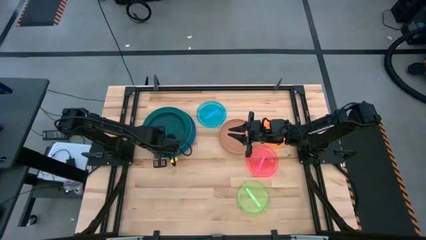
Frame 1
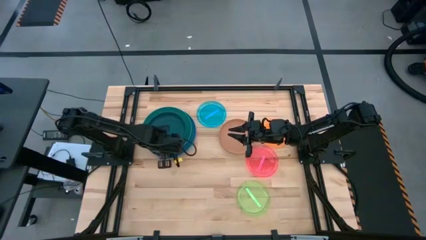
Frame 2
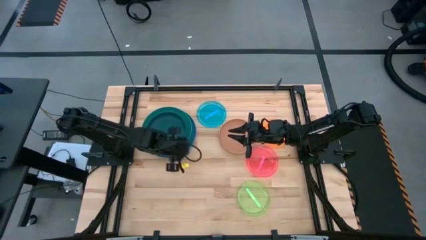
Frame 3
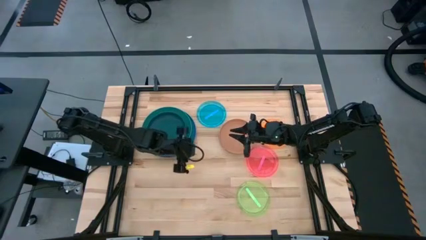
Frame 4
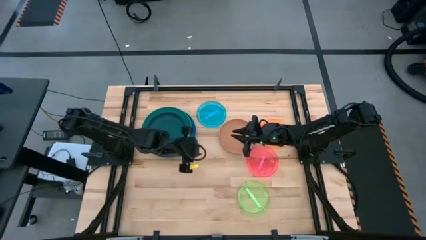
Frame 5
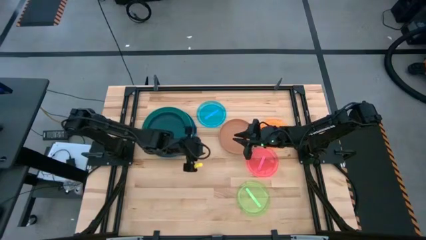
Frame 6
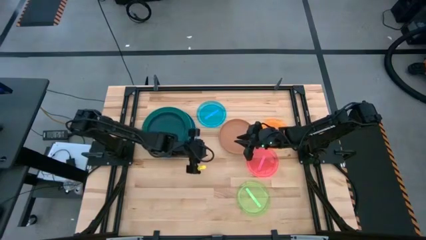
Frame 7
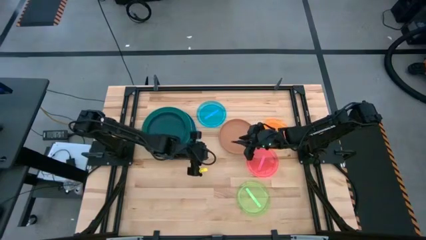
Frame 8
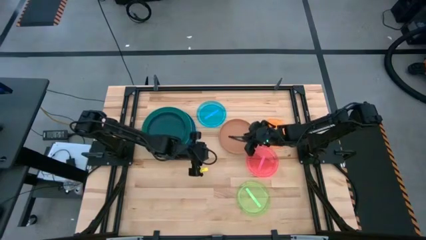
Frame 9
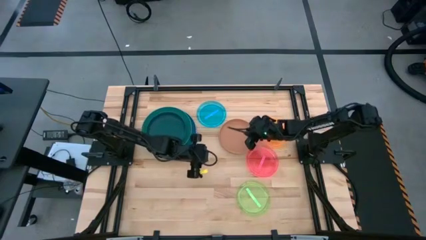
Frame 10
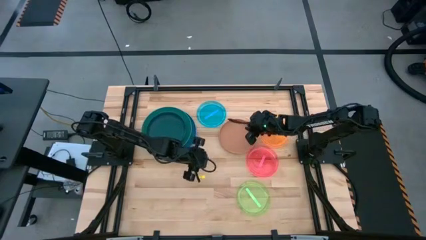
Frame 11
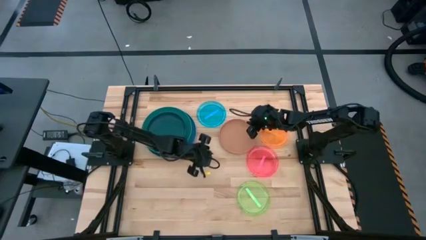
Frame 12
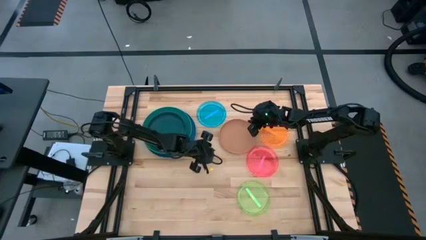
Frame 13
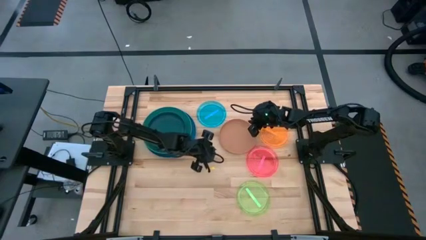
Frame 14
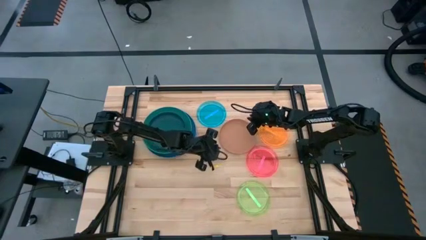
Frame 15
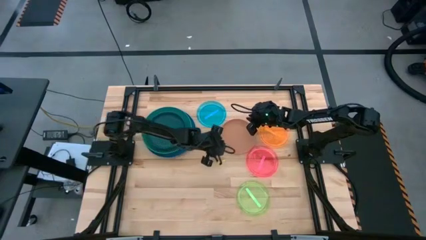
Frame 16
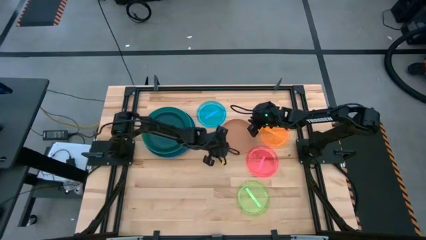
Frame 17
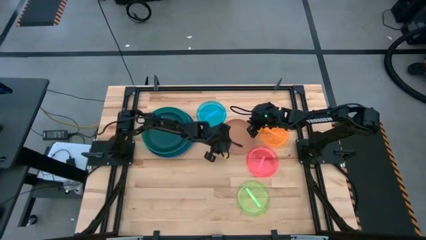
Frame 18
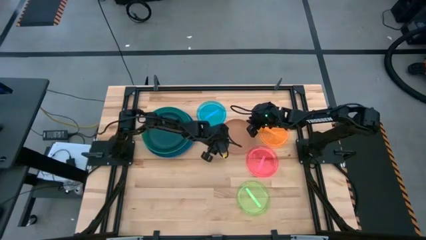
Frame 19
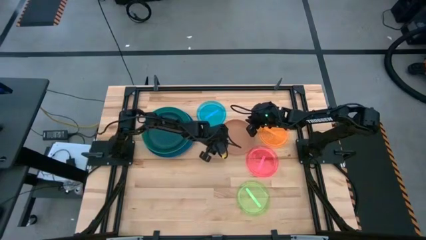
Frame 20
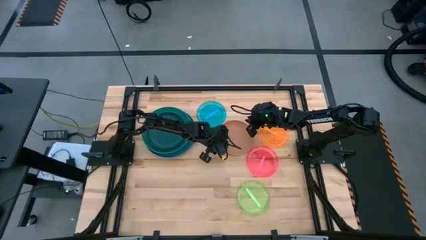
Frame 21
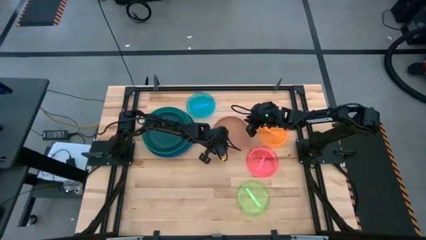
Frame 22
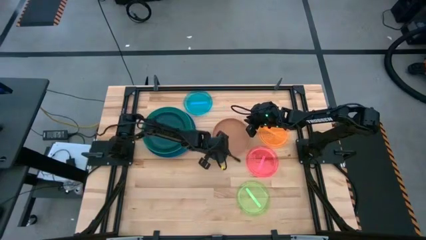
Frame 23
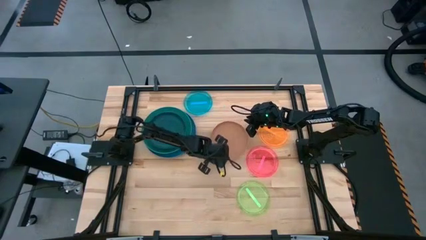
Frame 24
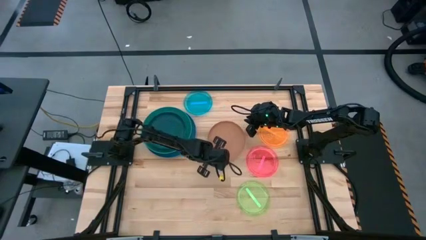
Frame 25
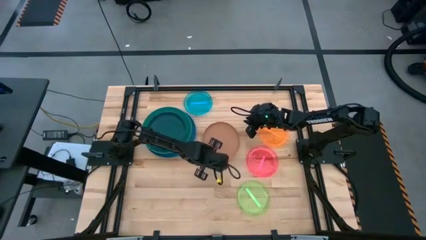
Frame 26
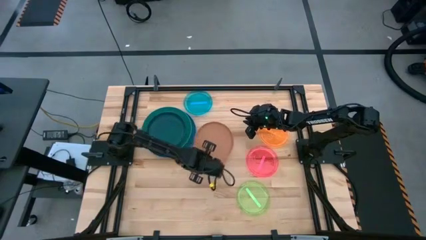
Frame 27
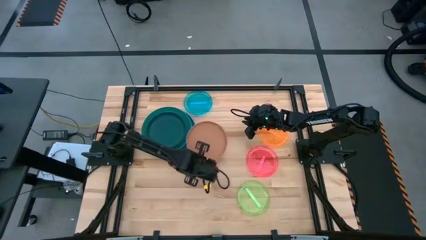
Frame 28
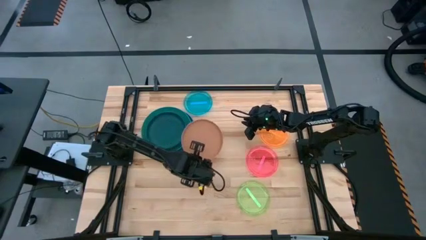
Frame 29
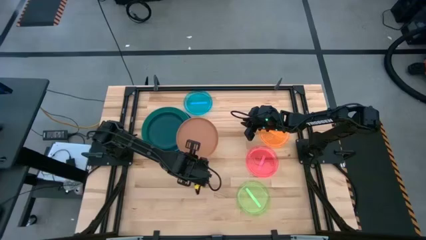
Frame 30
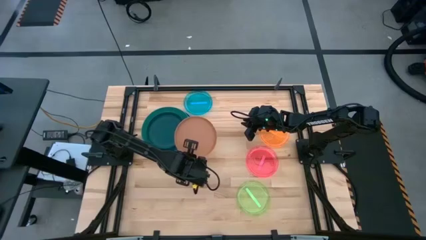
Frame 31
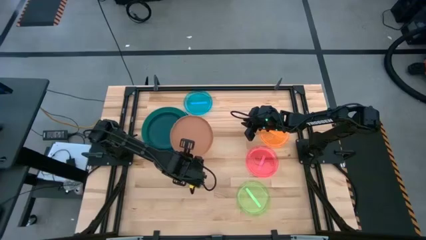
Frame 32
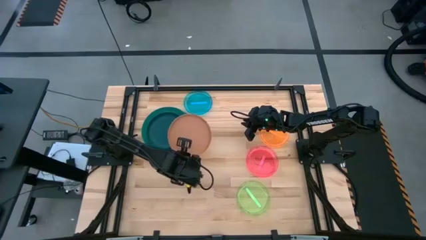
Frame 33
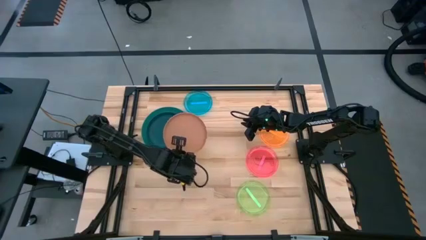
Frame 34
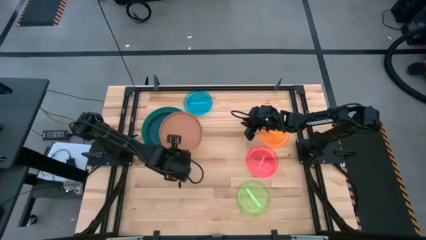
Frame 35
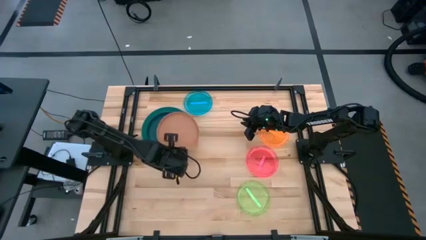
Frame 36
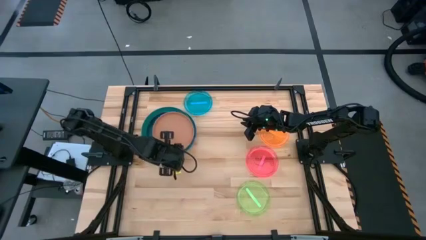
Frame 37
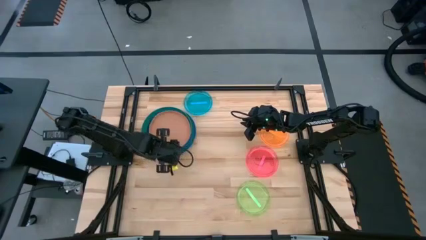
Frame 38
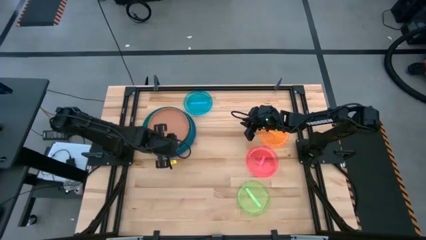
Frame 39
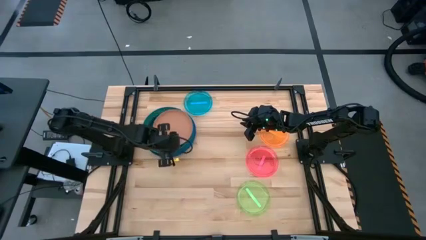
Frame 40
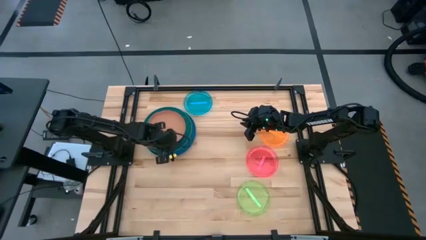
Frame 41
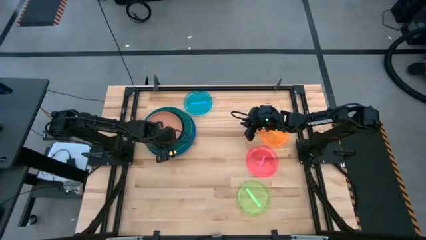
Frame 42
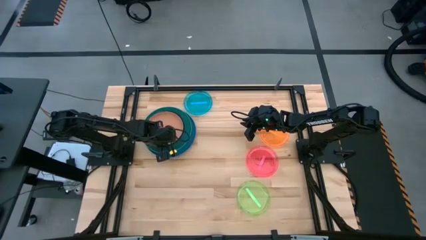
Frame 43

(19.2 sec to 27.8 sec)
Task: Stack plastic plates
Stack the brown plate on top of the dark blue plate

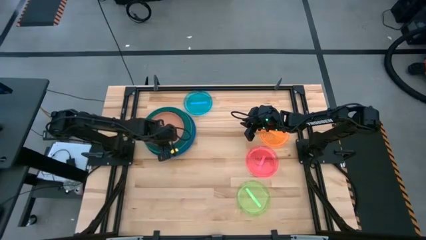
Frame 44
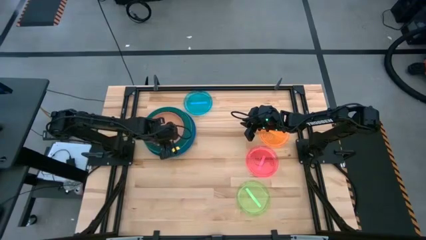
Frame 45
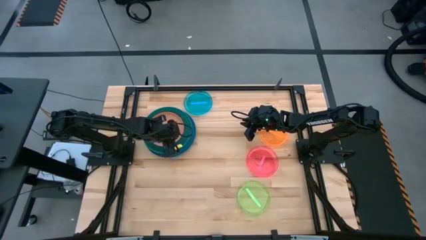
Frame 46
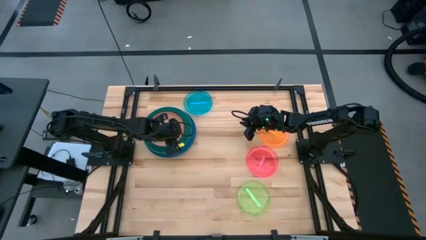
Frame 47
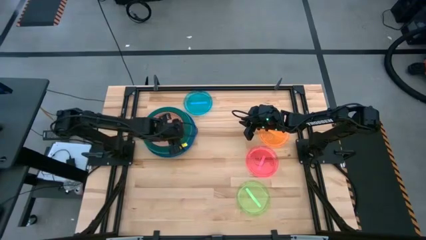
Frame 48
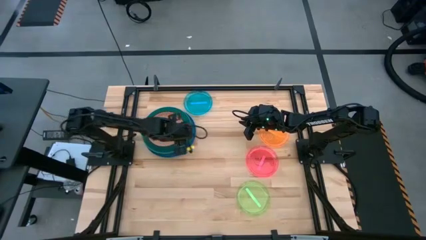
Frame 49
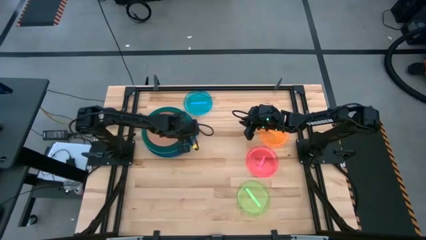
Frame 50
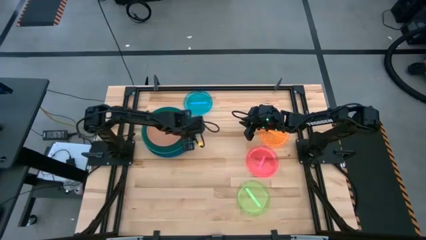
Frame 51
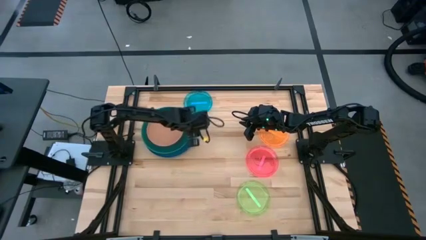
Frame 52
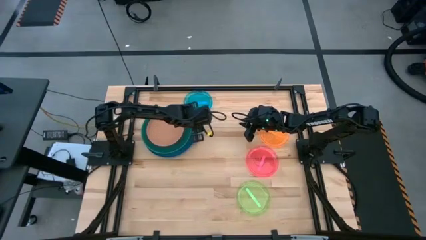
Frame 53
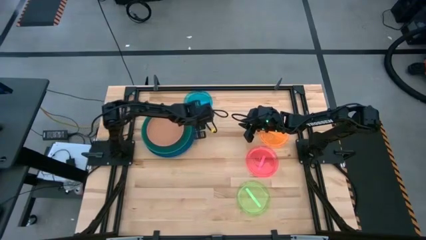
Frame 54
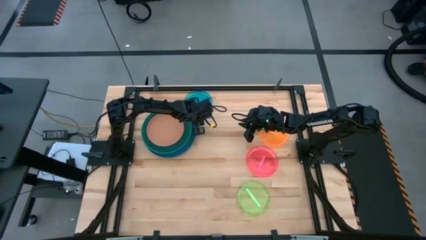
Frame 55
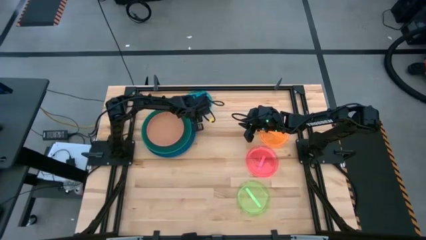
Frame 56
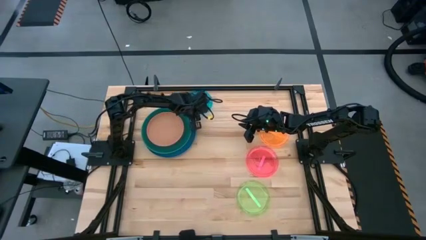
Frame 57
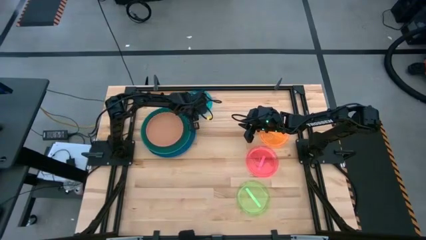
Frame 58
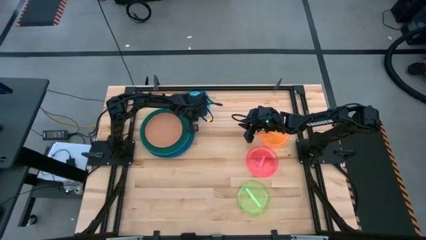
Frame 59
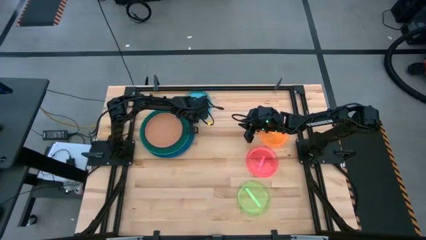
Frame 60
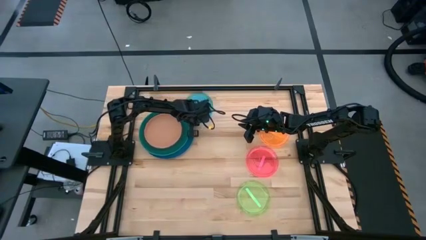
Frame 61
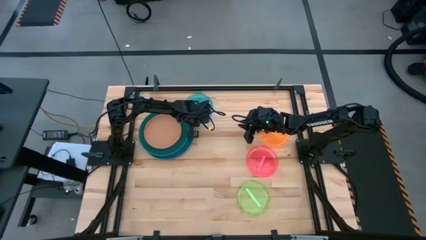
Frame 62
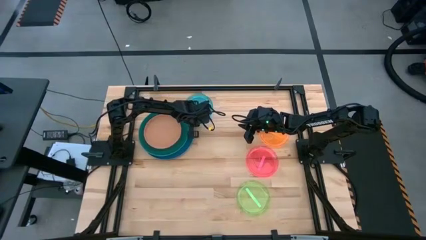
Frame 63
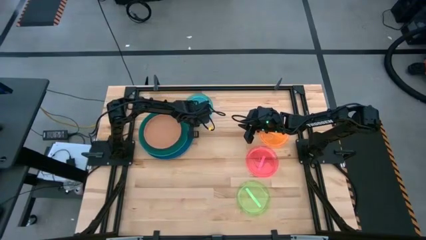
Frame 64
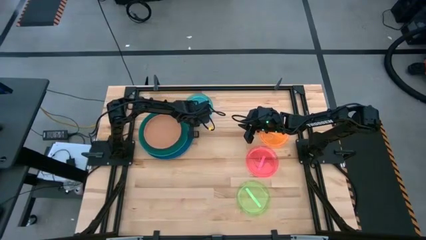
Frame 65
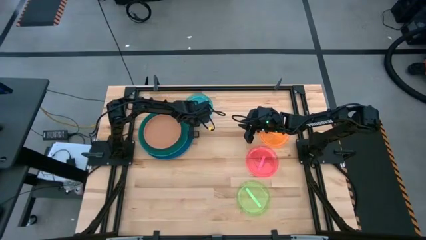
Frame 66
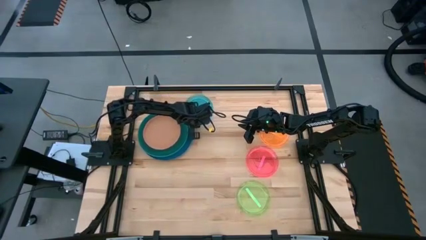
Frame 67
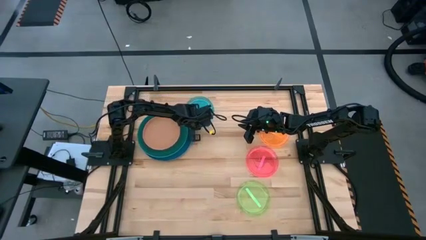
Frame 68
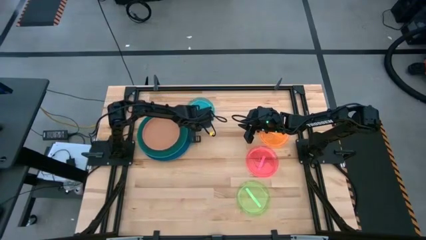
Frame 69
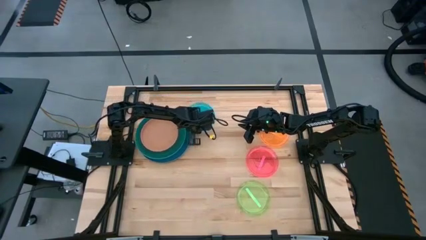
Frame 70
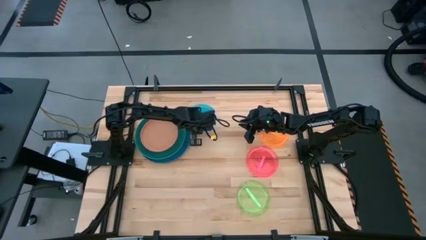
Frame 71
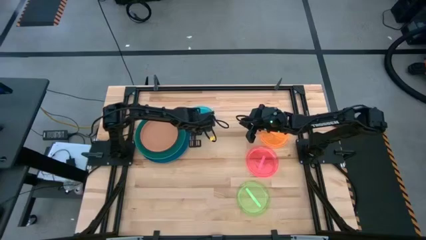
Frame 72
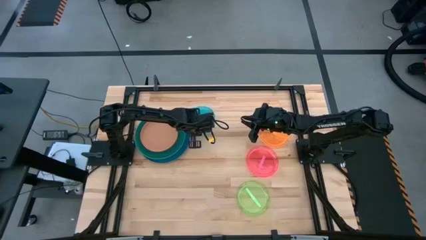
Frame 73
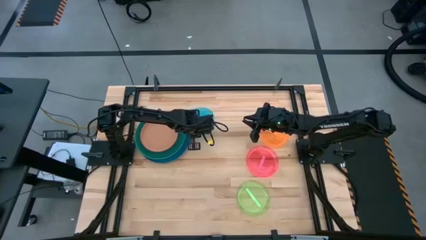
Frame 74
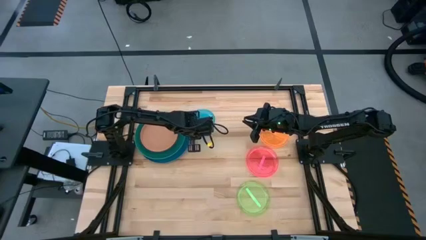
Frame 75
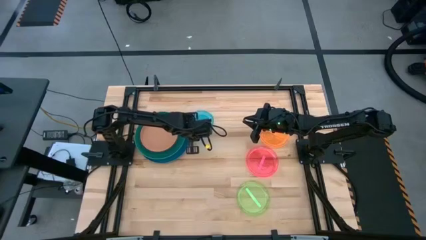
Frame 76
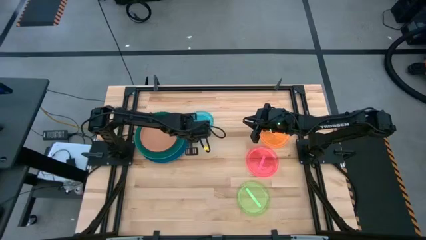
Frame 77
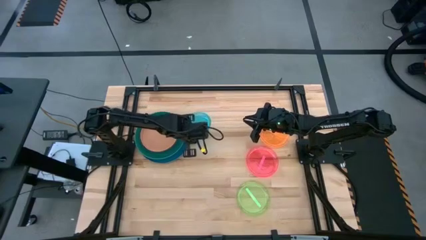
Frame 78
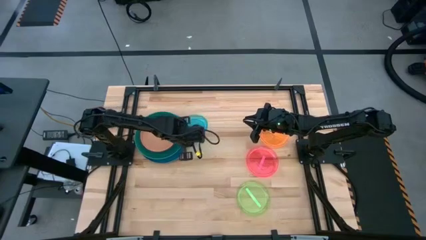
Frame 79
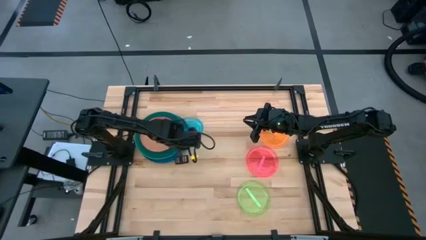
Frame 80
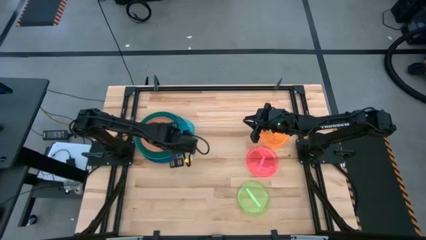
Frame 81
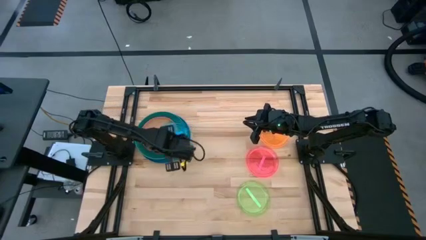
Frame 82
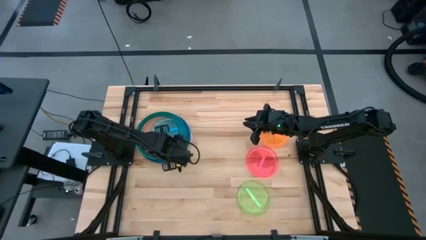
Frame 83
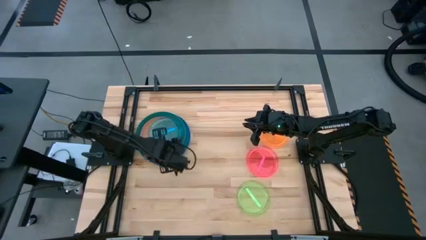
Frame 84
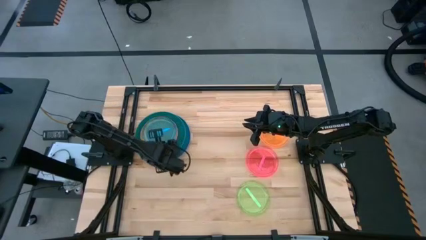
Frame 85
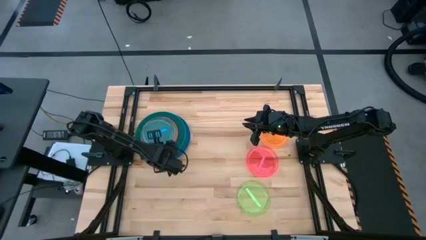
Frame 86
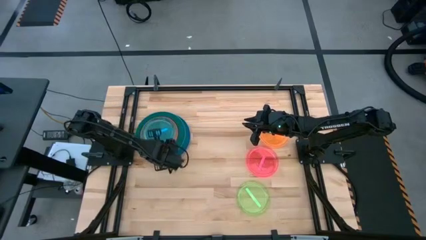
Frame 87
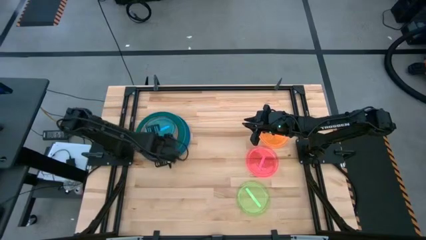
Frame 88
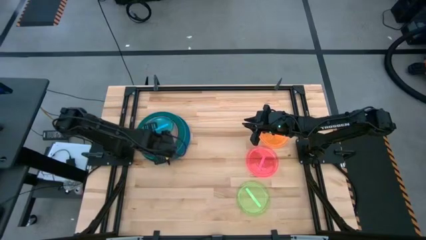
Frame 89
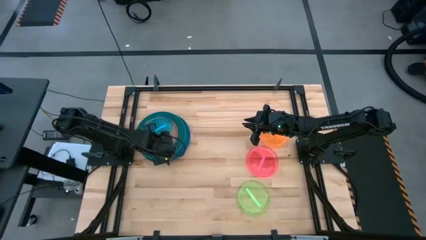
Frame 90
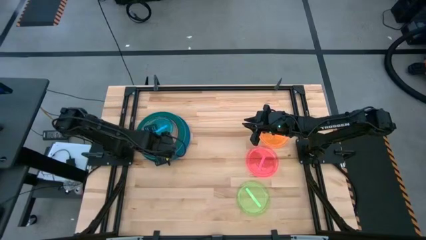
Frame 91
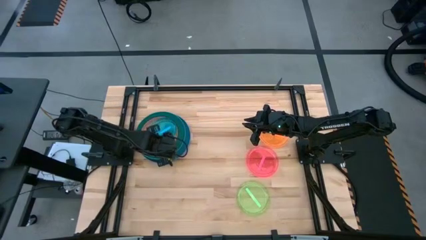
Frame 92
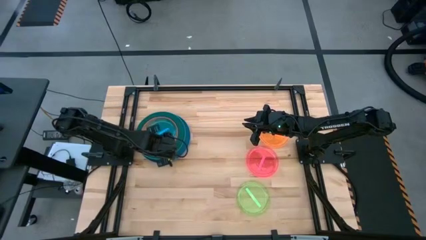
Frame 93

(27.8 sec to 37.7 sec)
Stack the light blue plate on top of the brown plate
